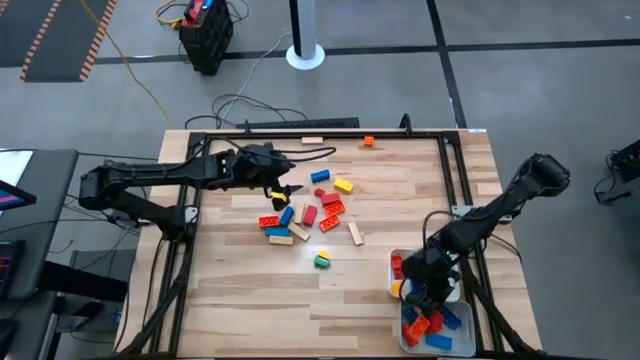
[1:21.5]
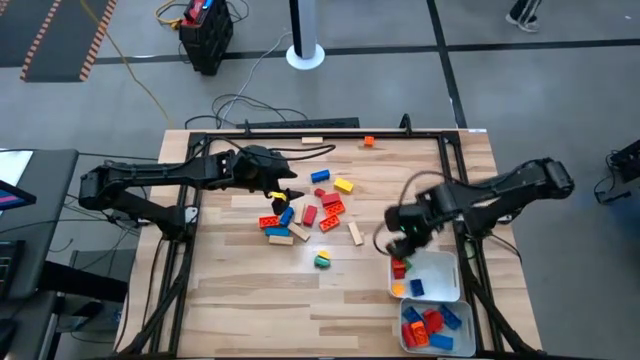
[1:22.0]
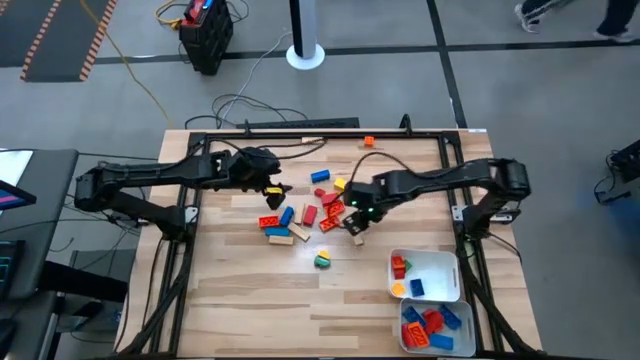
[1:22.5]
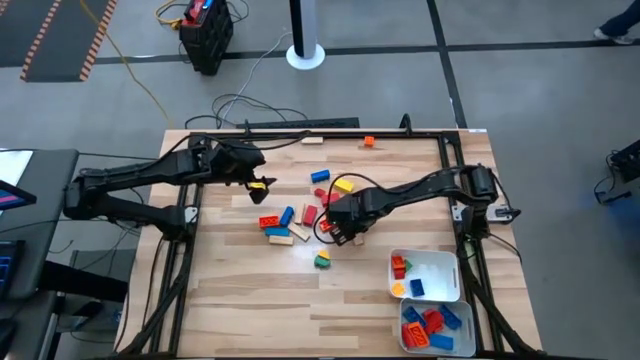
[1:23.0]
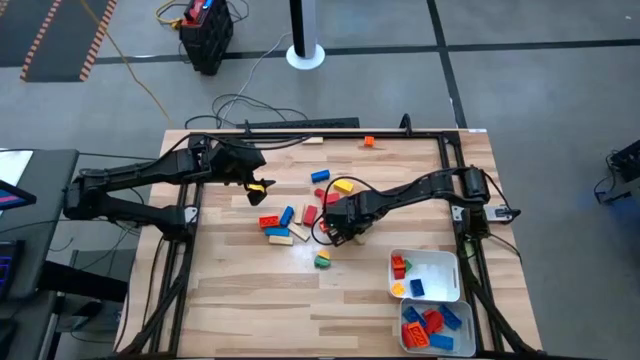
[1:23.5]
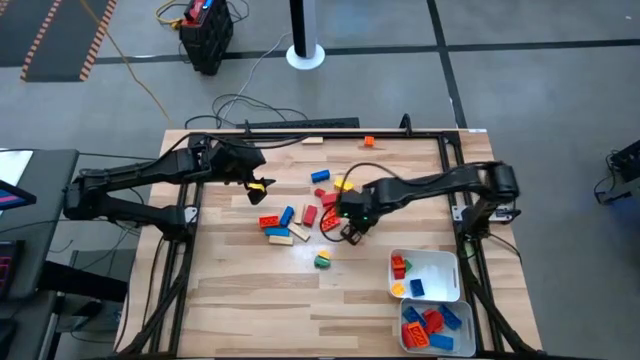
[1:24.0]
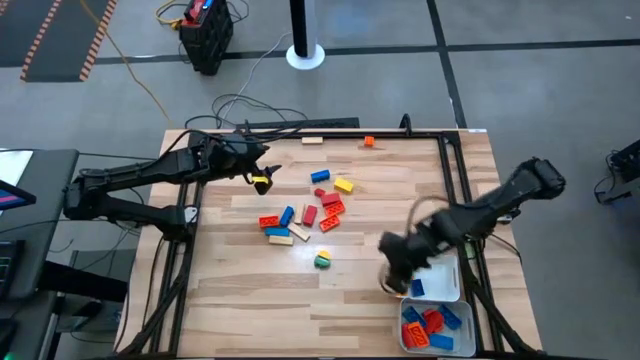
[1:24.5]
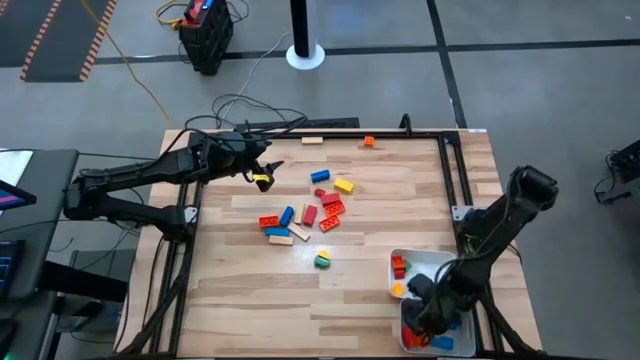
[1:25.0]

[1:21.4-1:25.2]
Task: Sort blocks by size
Put the big brown block into the gray bin

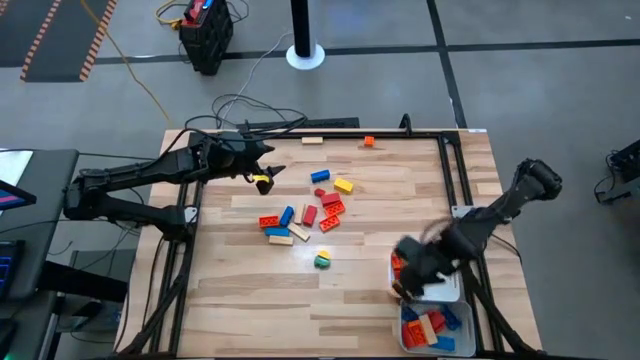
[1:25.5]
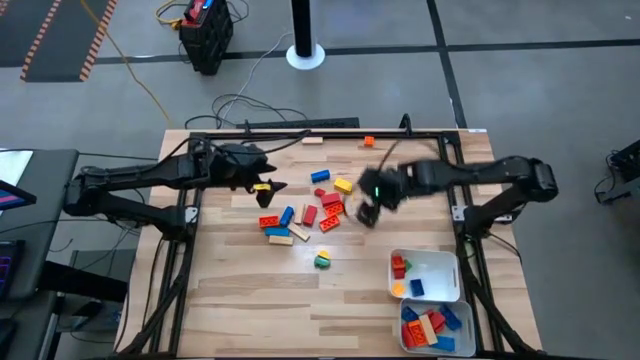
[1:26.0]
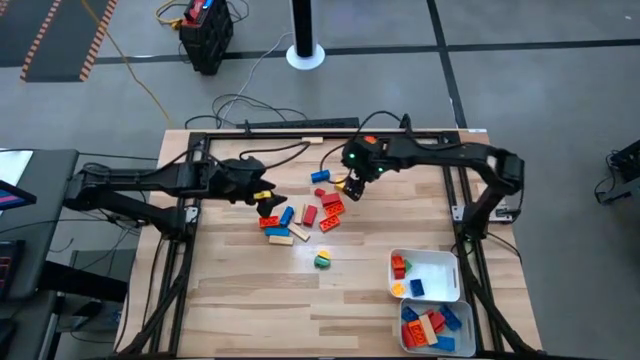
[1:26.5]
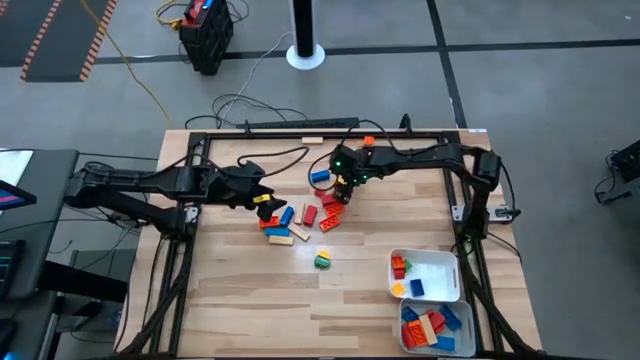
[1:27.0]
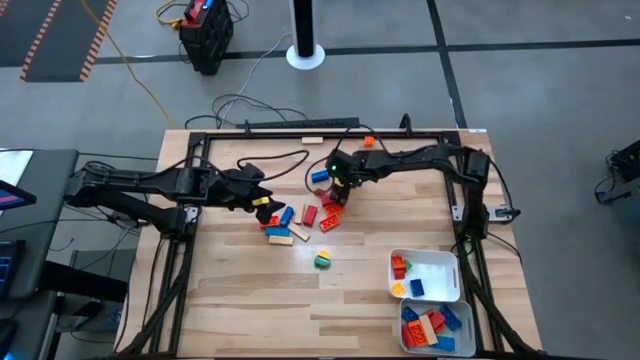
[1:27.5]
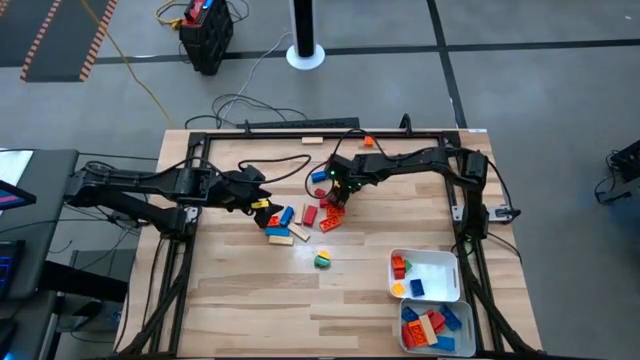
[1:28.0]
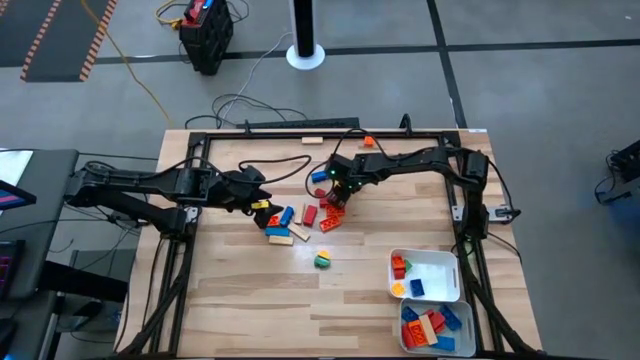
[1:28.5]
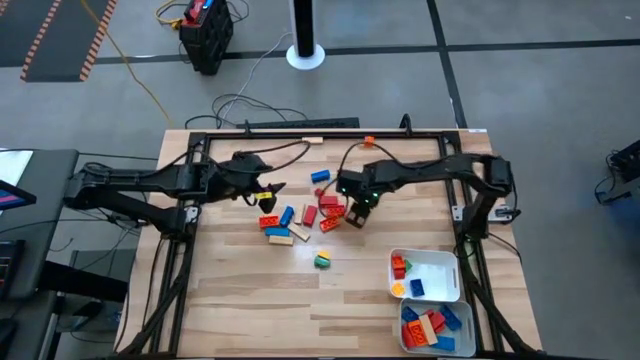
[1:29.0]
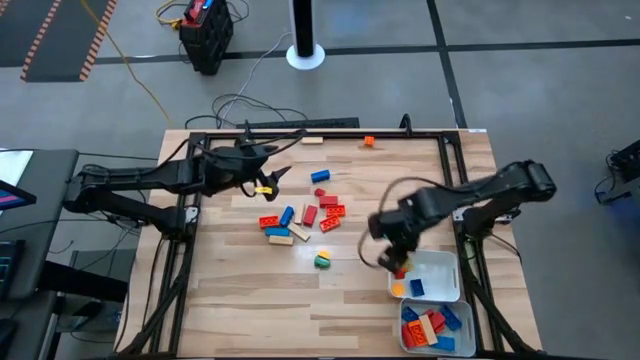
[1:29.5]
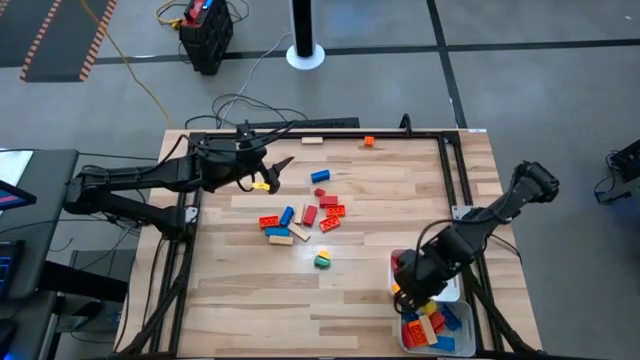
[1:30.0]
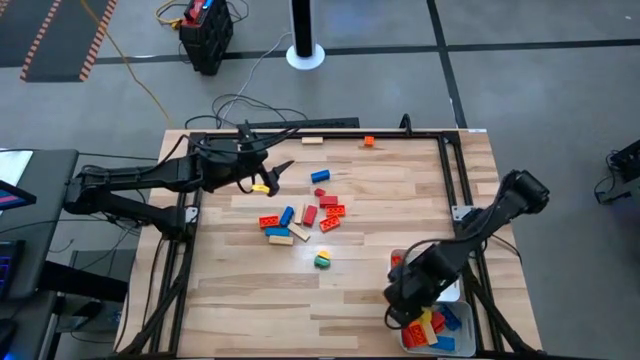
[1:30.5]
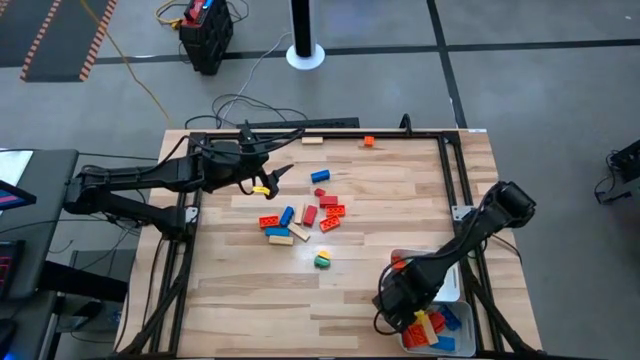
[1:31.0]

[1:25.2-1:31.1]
Put the big yellow block into the gray bin

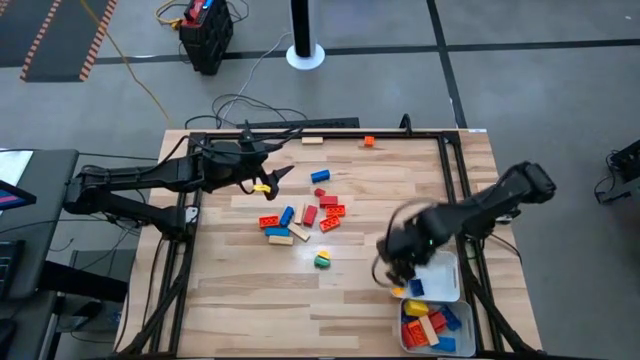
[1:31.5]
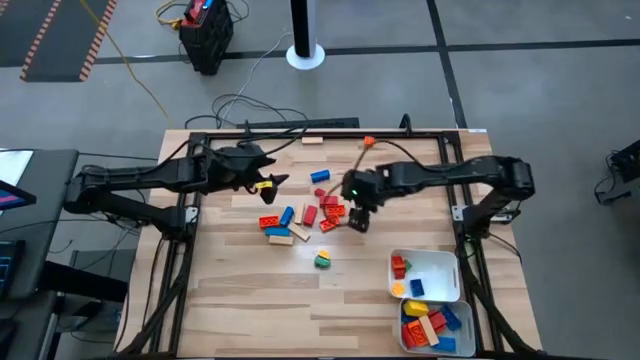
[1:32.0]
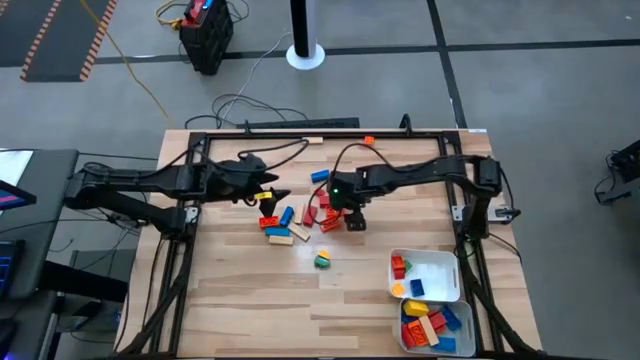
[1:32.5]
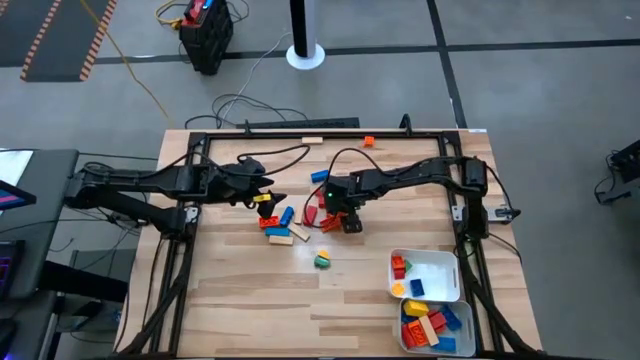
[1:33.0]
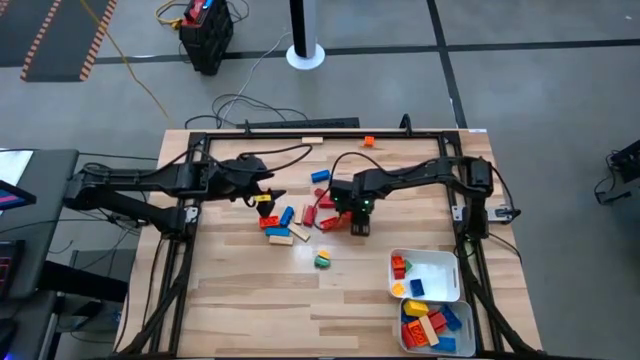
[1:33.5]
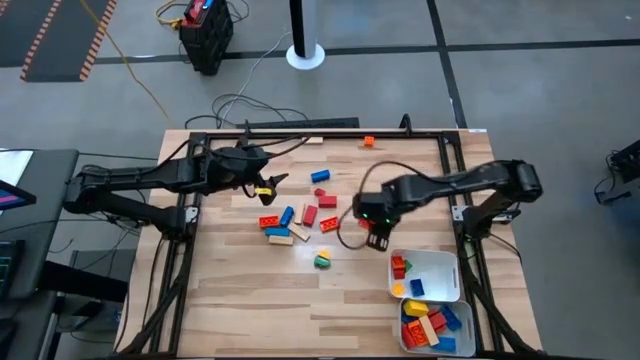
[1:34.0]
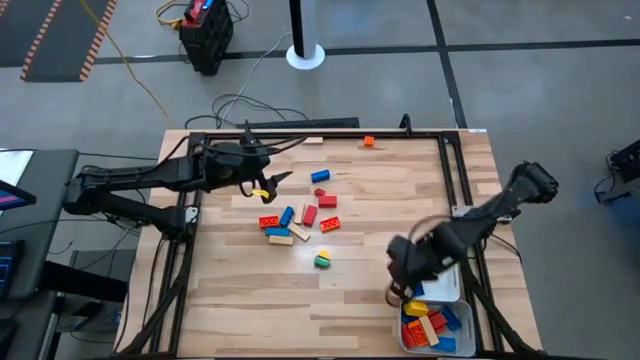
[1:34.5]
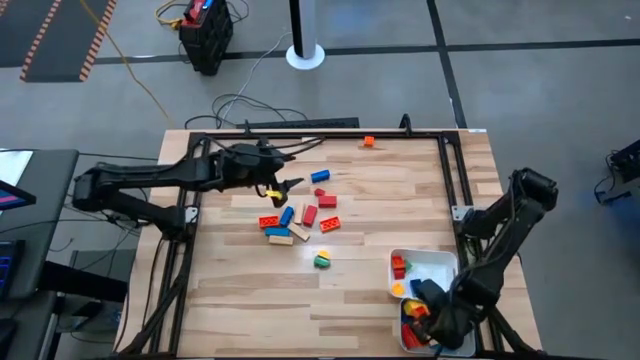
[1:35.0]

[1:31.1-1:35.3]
Put the big orange game piece into the gray bin

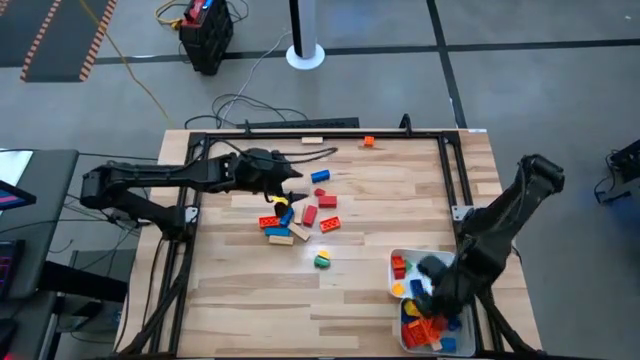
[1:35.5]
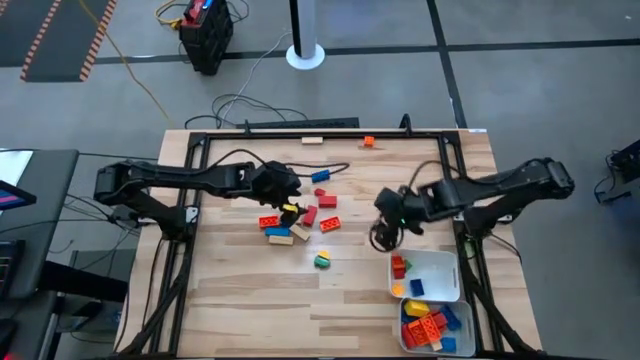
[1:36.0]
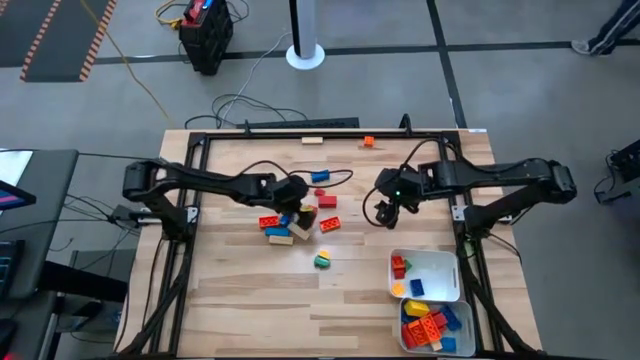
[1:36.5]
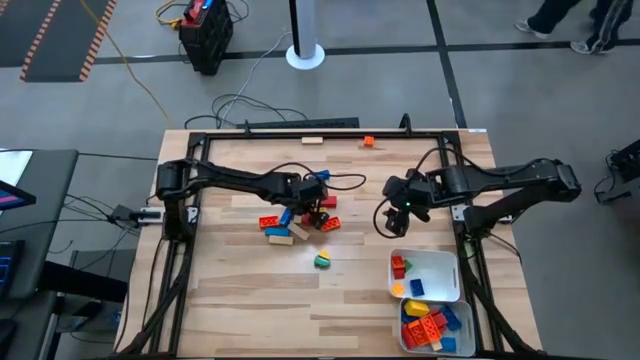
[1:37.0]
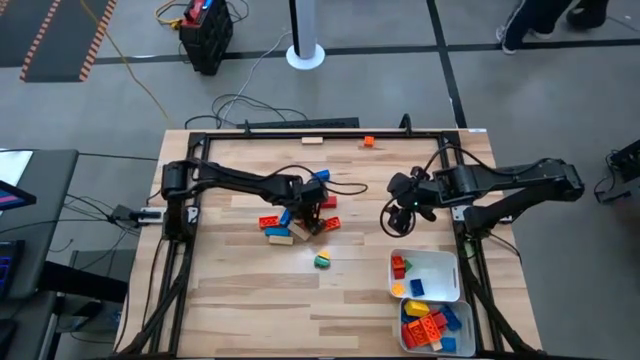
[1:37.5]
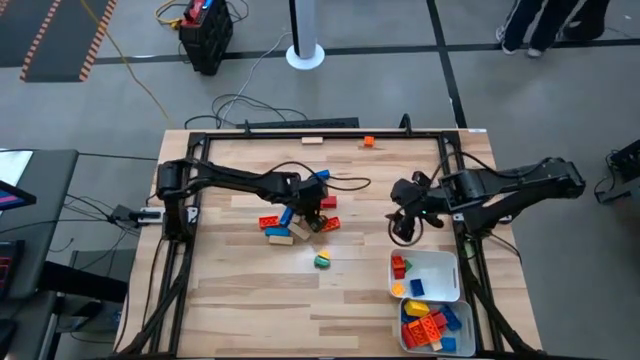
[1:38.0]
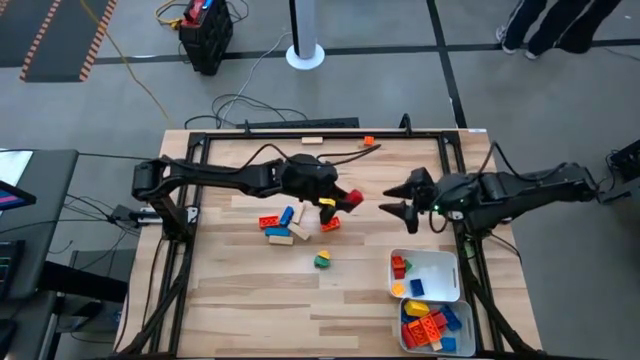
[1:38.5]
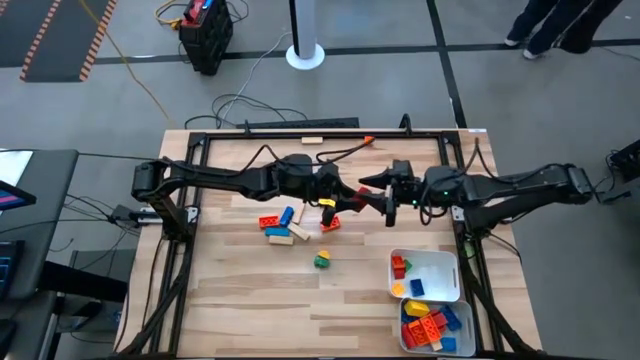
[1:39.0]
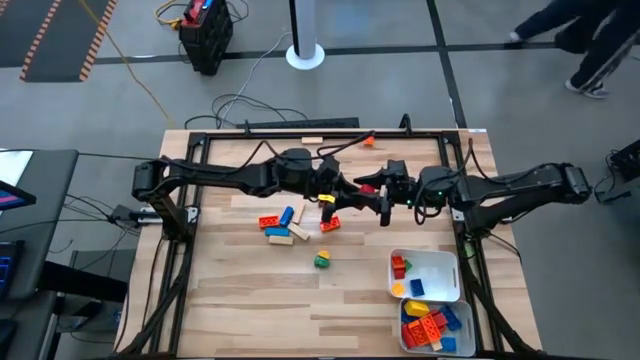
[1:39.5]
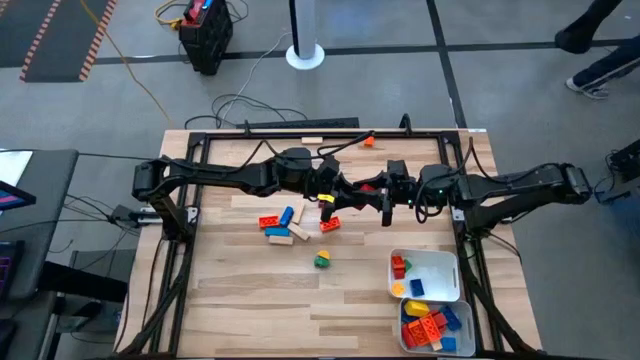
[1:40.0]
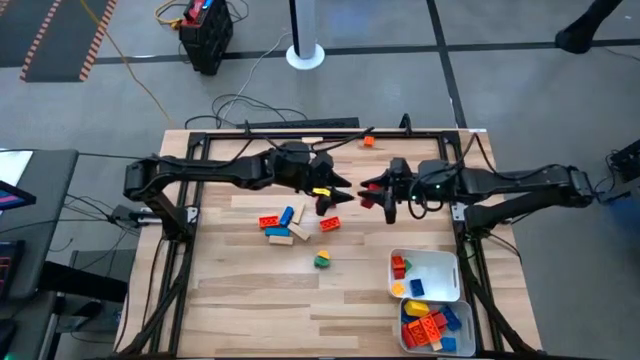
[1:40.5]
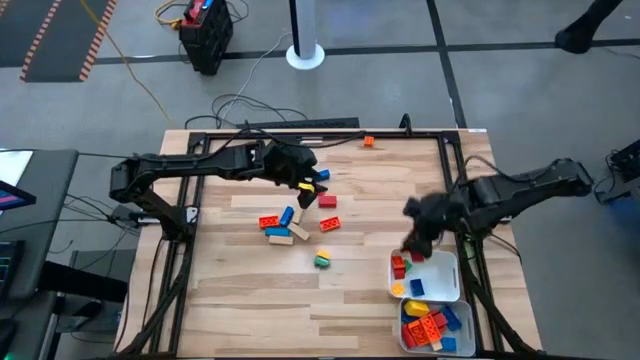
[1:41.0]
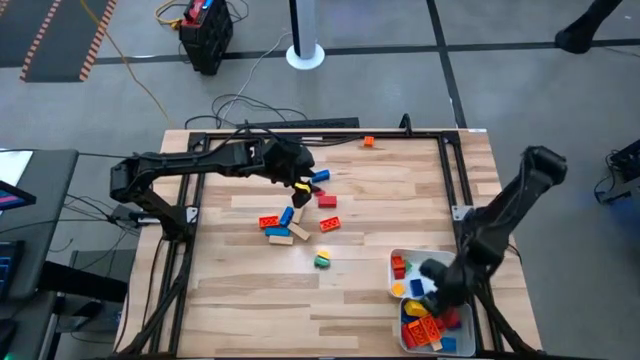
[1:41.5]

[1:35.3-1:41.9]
Put the big red block into the gray bin

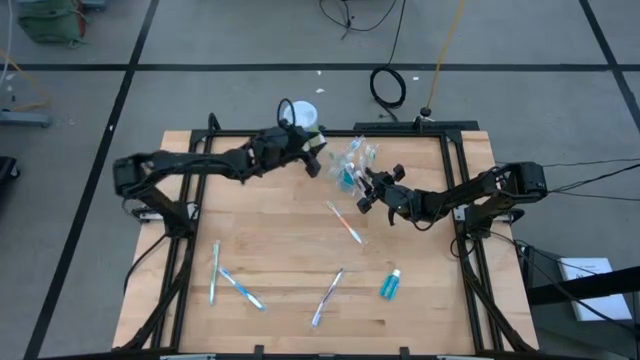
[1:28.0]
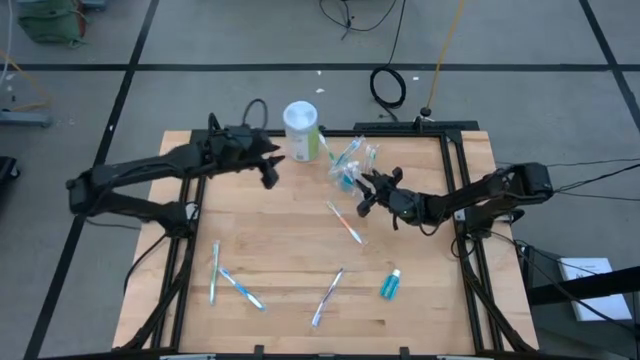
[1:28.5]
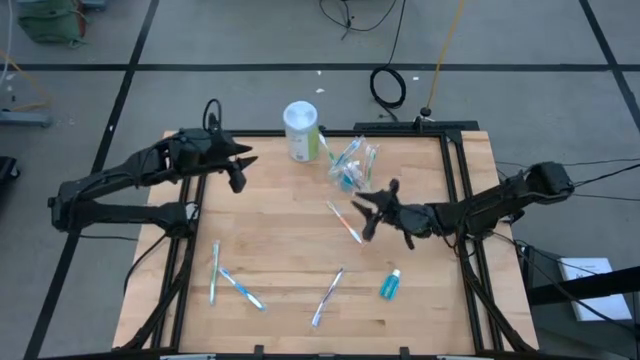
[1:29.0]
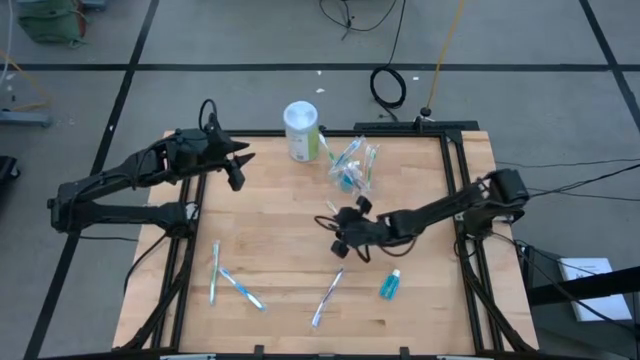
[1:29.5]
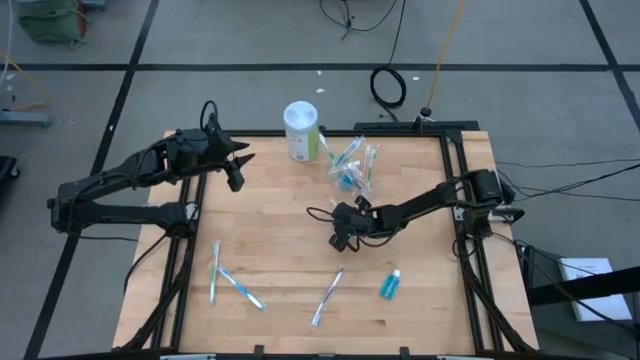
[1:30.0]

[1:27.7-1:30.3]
Task: Pick & Place toothbrushing station
Put the orange toothbrush into the transparent organizer
